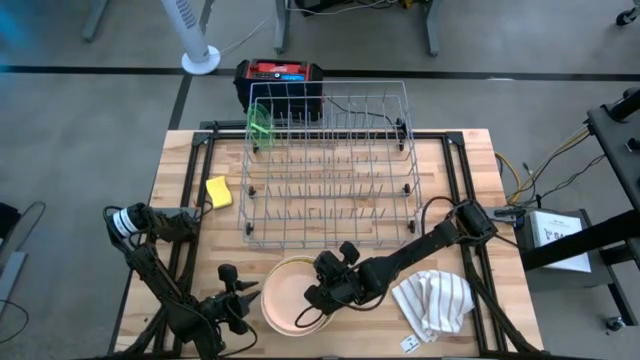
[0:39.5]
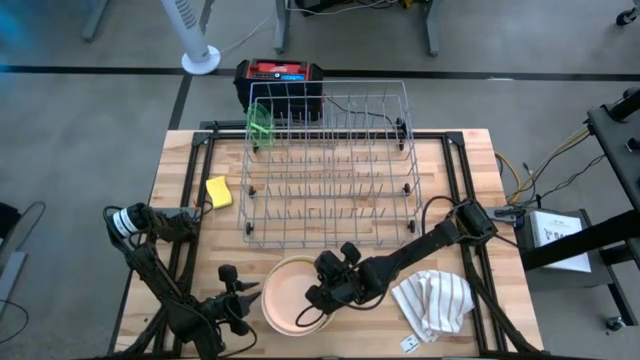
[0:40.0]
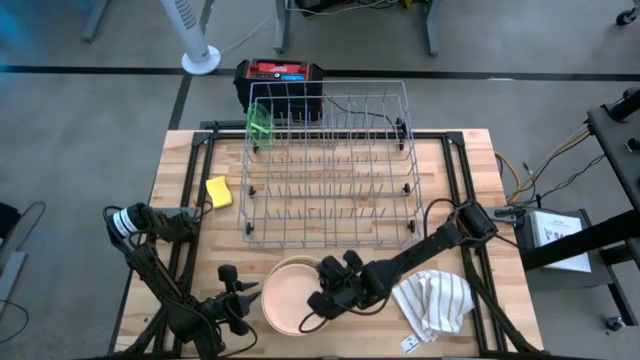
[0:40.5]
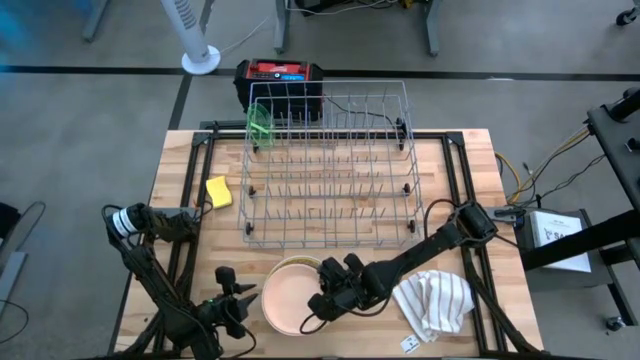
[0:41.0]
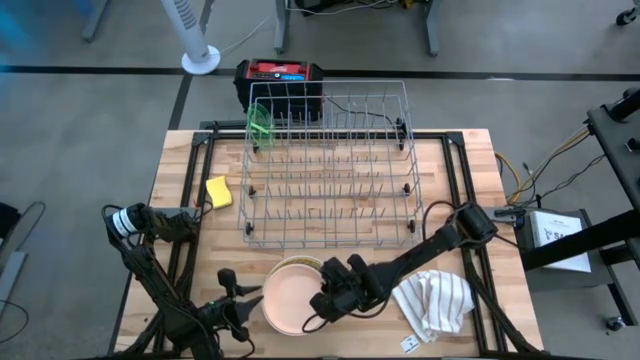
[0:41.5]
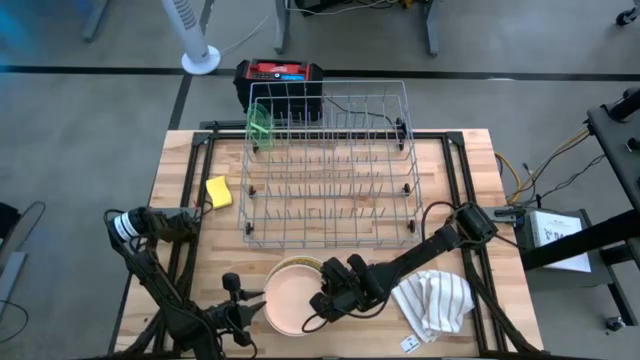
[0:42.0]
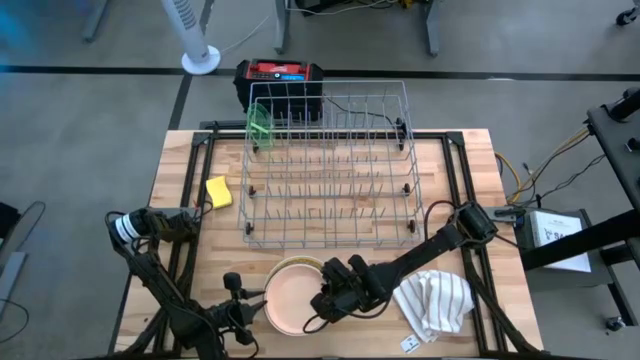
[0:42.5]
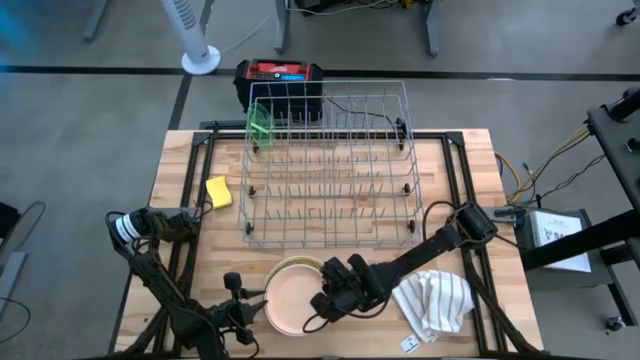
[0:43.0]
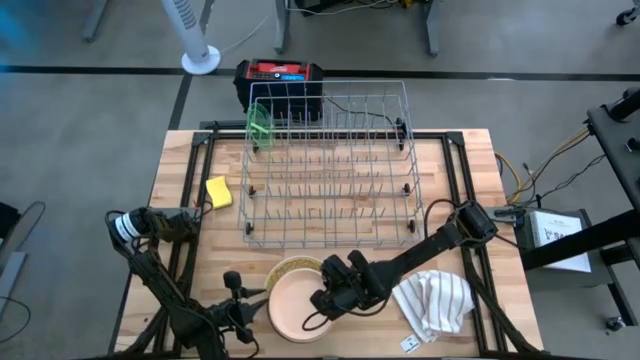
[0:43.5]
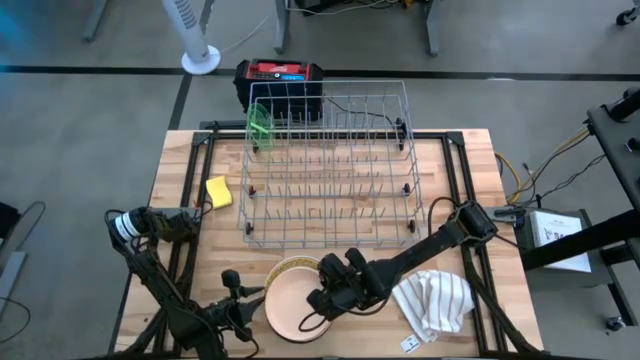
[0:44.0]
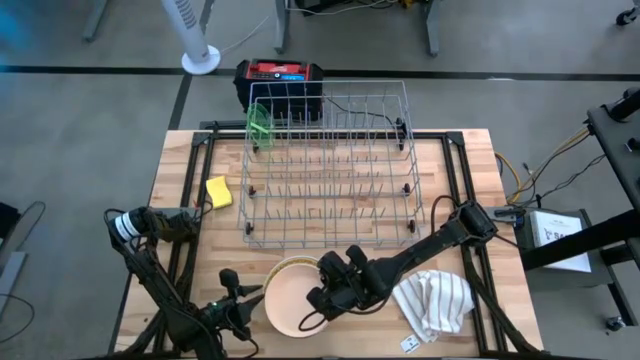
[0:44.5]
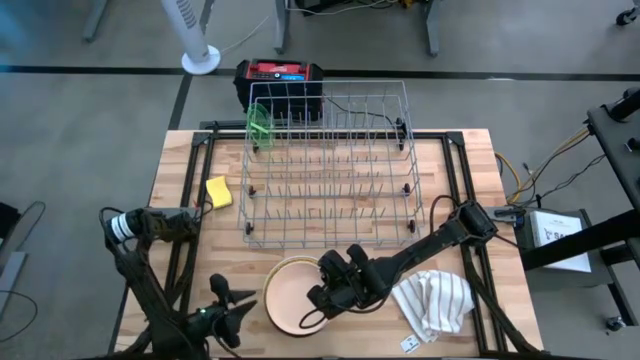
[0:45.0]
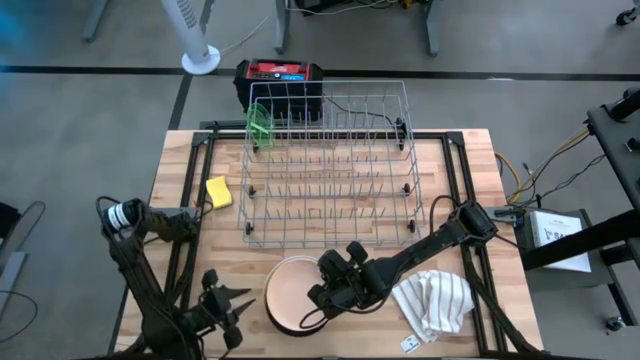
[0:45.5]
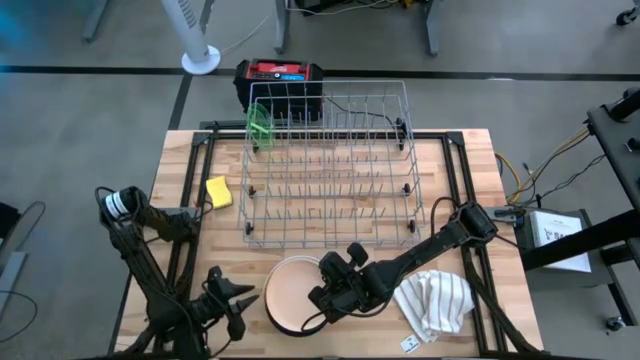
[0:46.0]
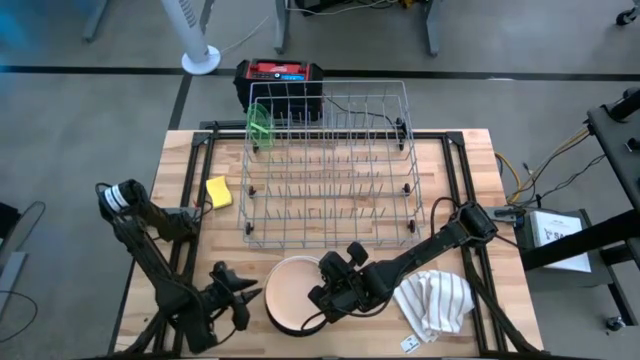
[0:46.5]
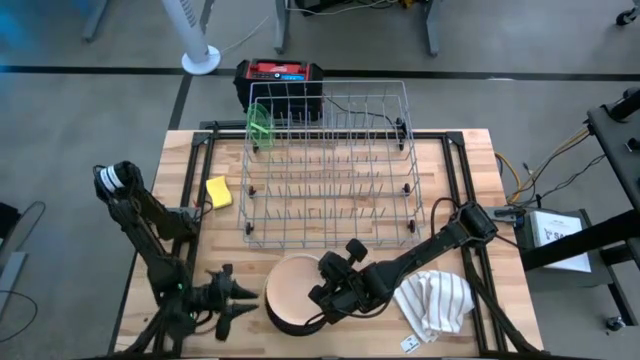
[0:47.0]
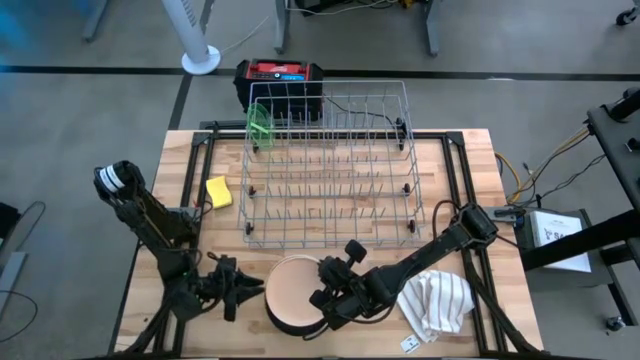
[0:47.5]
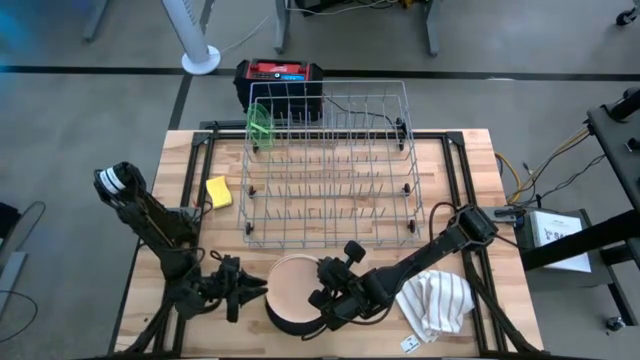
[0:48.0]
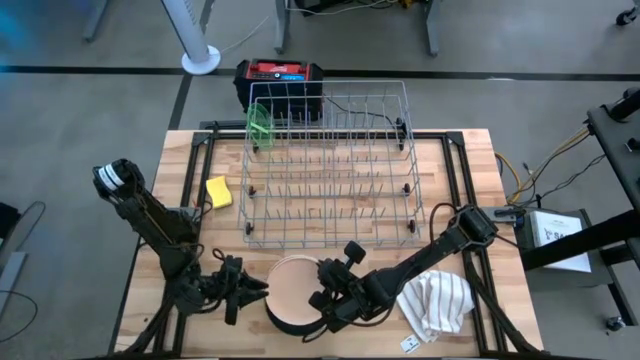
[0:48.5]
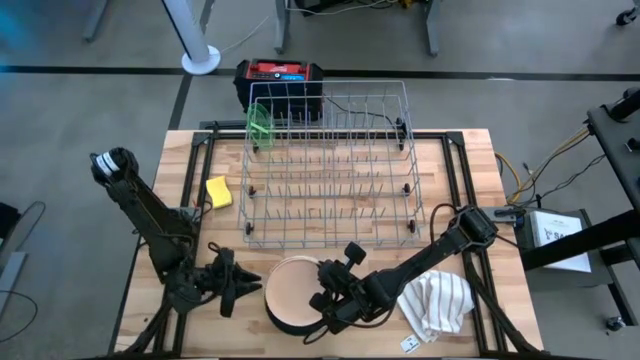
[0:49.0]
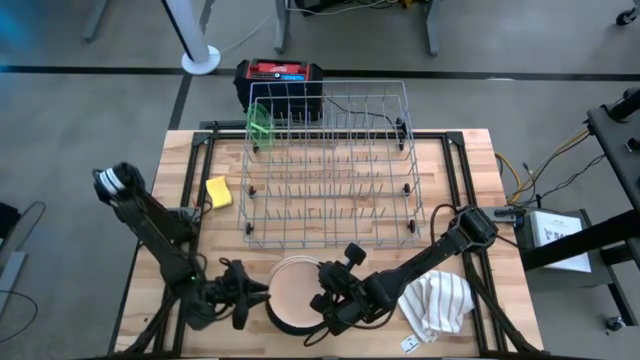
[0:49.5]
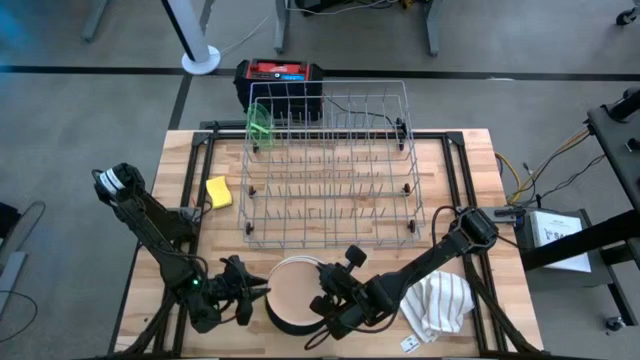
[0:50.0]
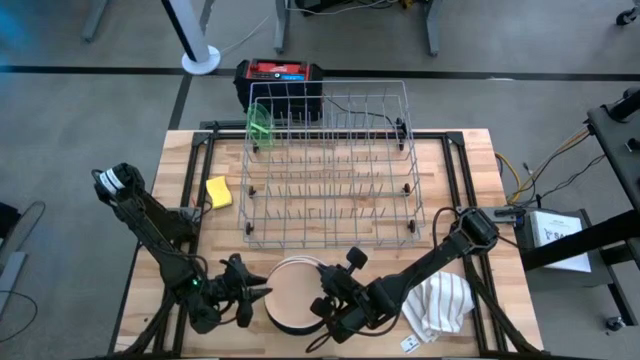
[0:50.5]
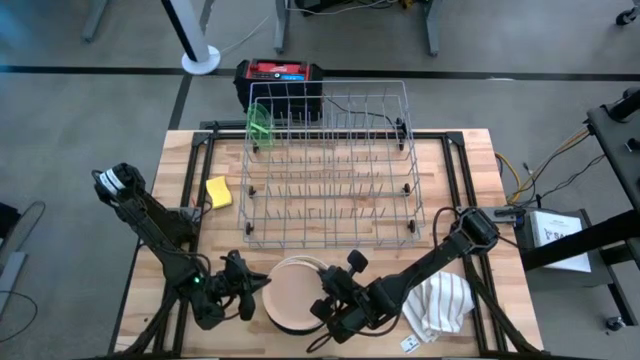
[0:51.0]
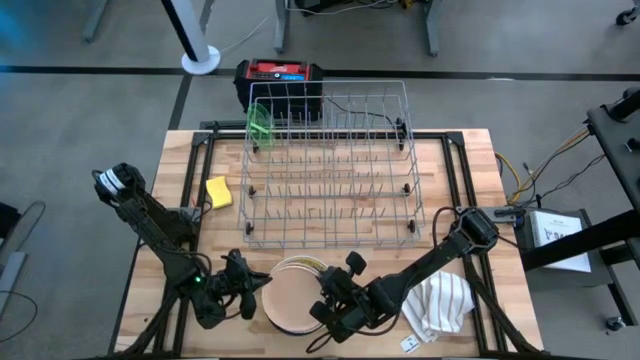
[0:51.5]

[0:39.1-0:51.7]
Task: Sort dishes
Put the light pink plate into the dish rack

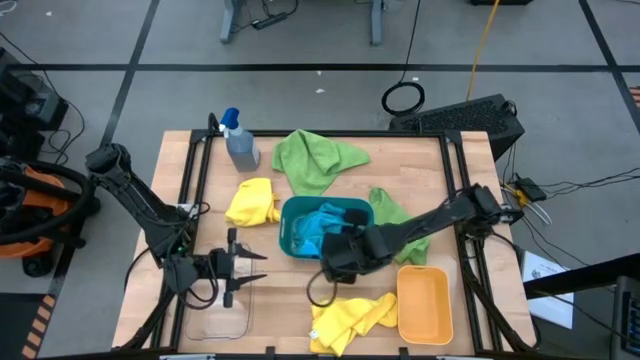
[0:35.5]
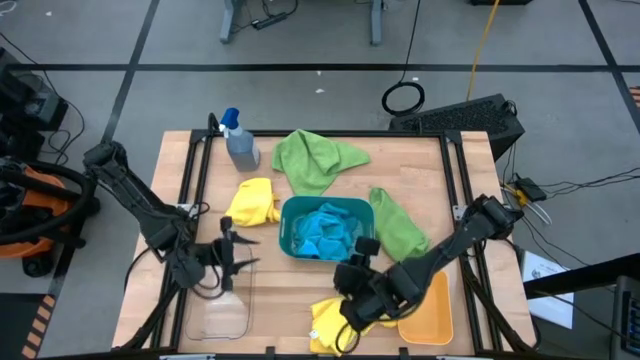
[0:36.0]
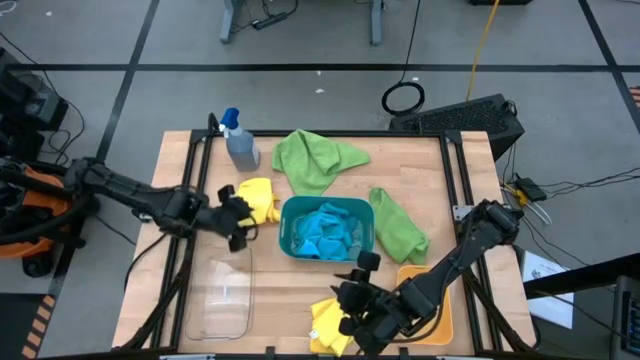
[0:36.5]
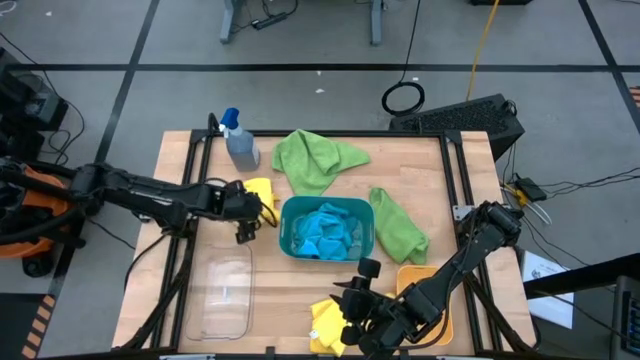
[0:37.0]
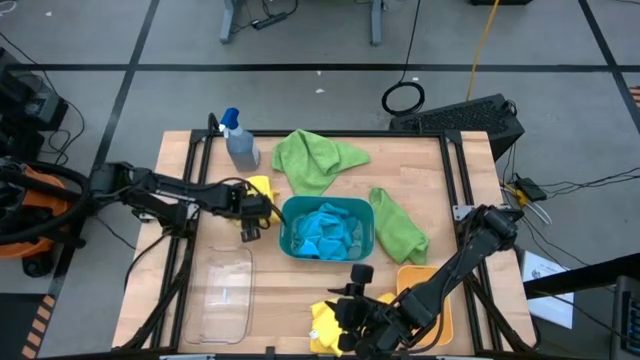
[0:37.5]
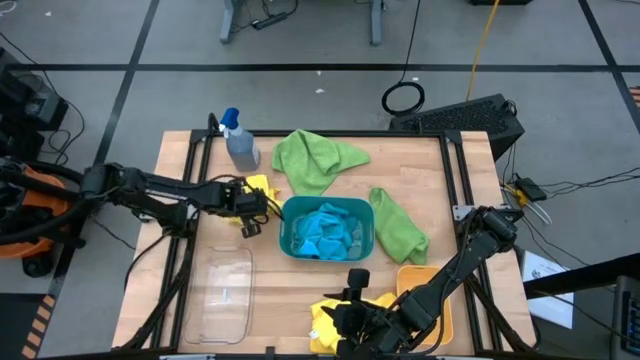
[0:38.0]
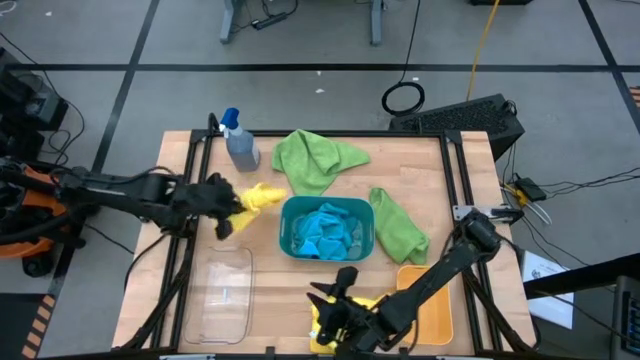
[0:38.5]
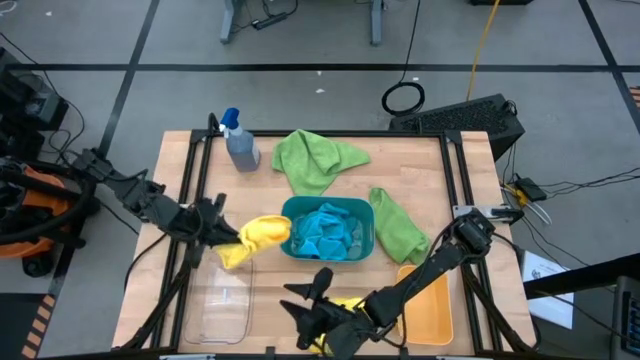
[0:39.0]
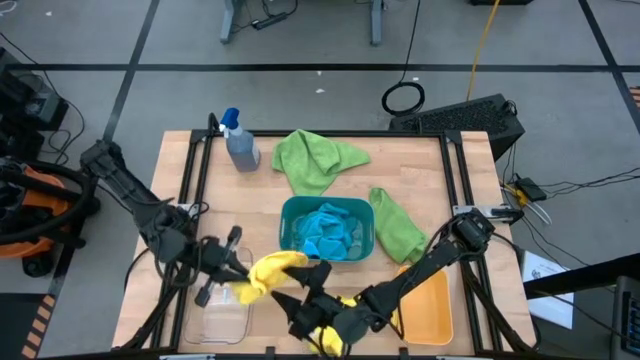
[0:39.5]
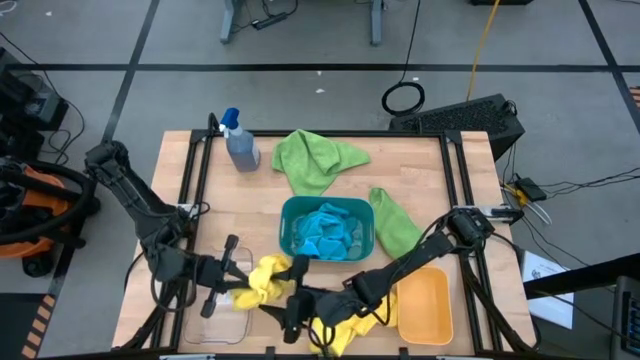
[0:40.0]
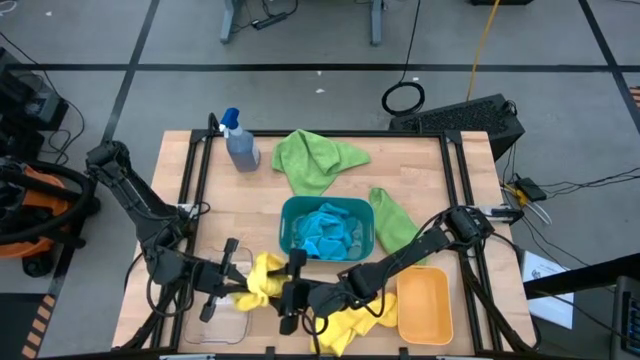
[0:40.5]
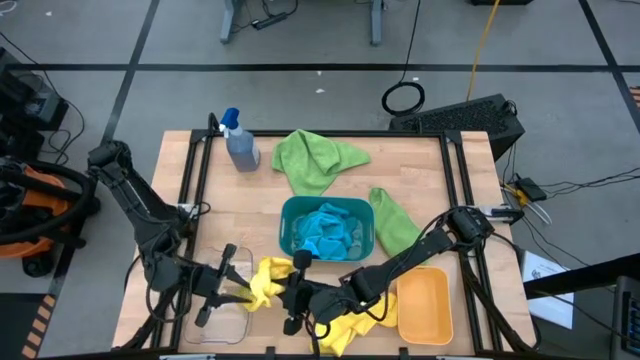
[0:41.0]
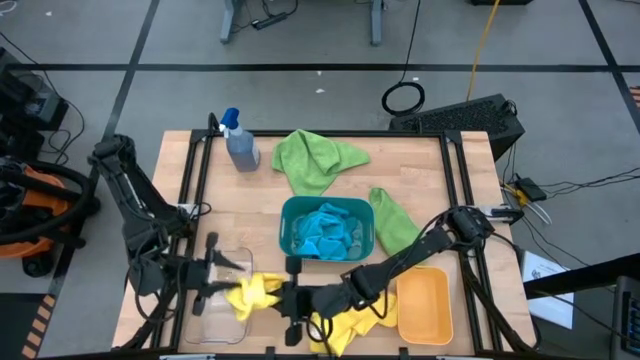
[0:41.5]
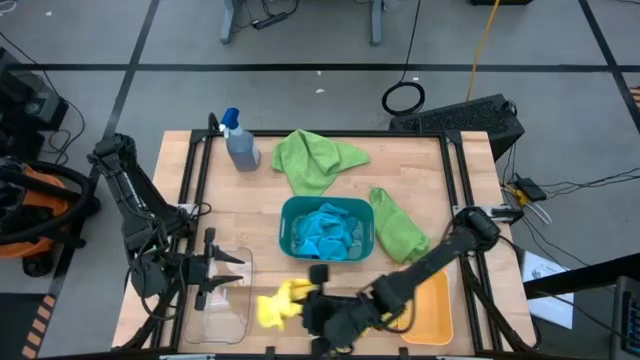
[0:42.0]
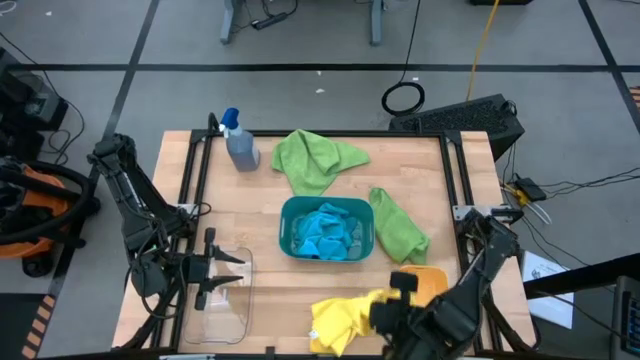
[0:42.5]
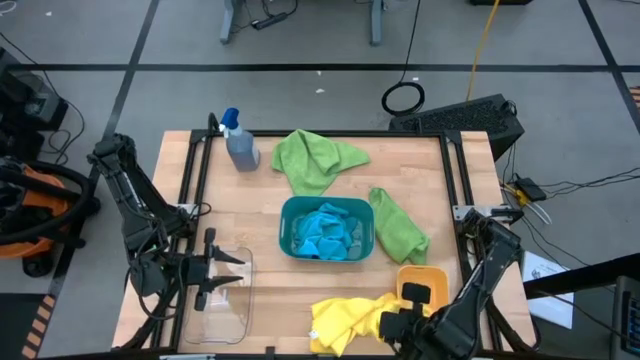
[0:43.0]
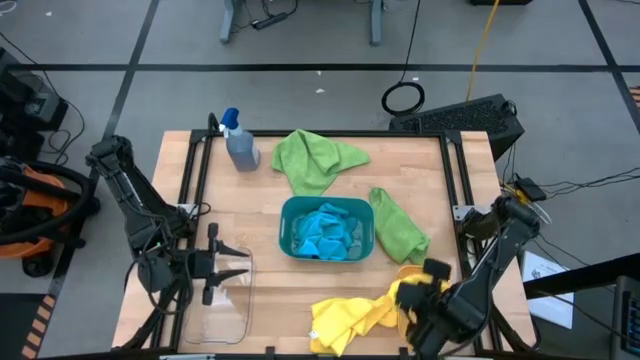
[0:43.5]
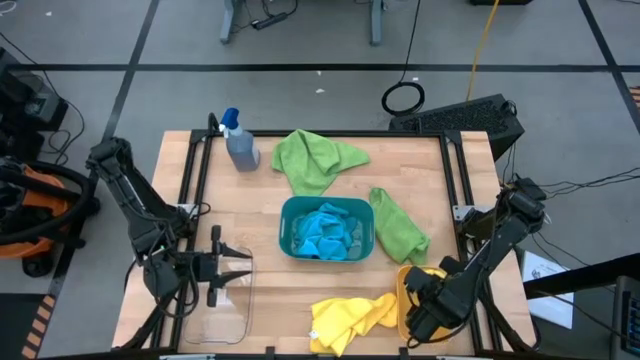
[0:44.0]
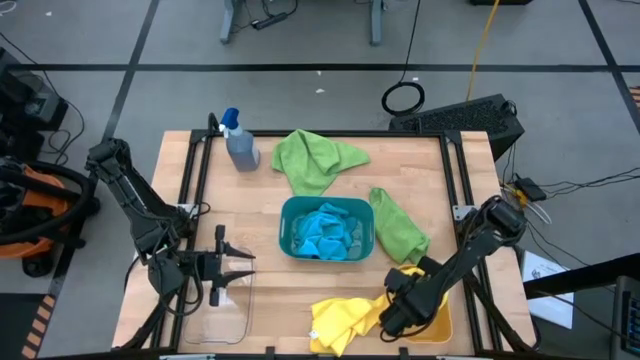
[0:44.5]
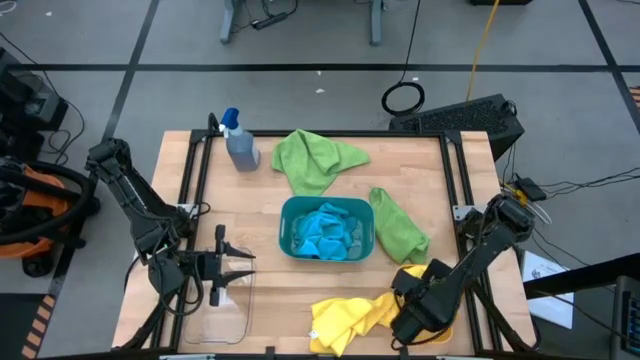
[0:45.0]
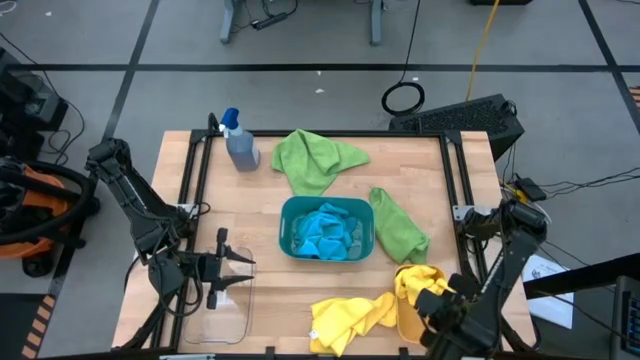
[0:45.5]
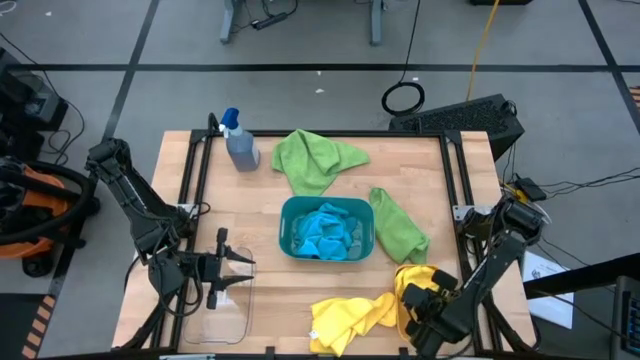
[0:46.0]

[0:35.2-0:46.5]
Task: Sort microfiber towel by color & place in baskets
Put the top yellow microfiber towel into the orange bin
